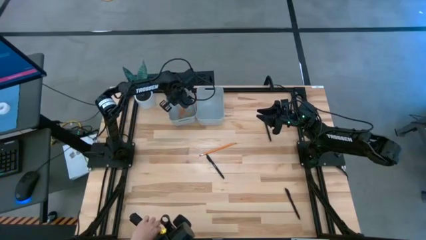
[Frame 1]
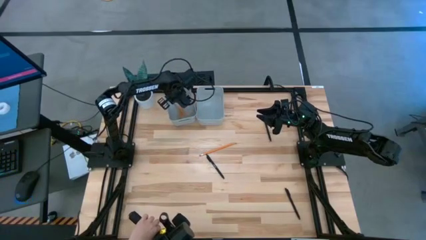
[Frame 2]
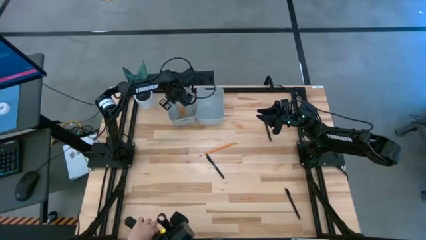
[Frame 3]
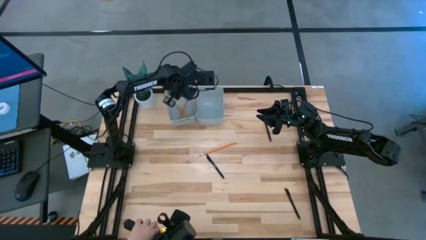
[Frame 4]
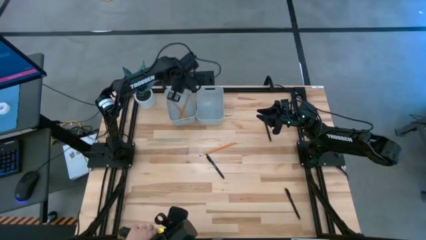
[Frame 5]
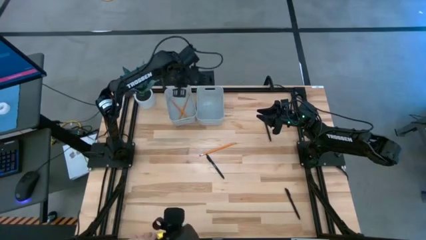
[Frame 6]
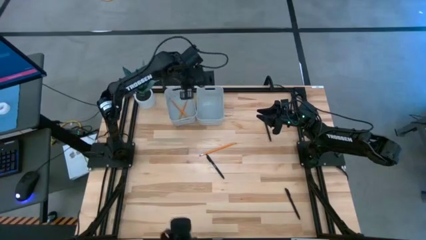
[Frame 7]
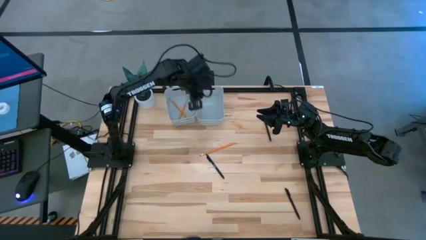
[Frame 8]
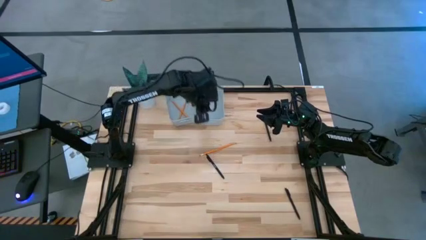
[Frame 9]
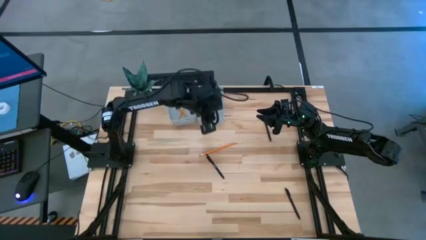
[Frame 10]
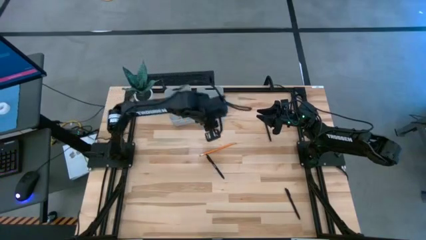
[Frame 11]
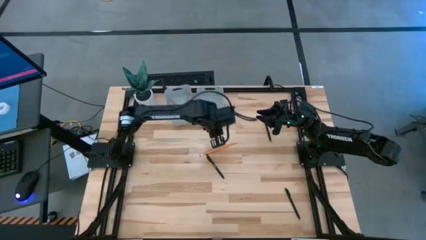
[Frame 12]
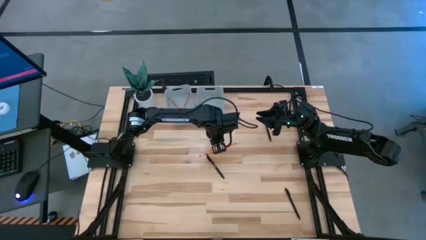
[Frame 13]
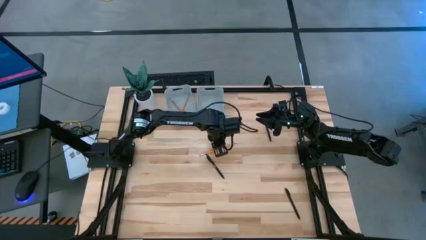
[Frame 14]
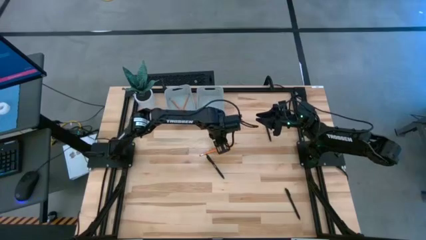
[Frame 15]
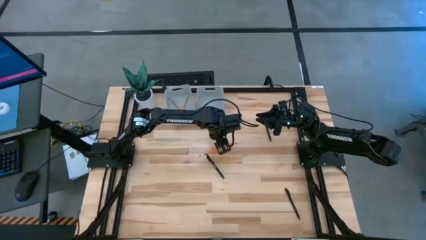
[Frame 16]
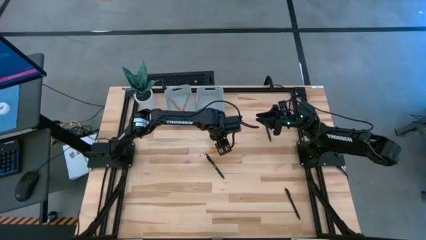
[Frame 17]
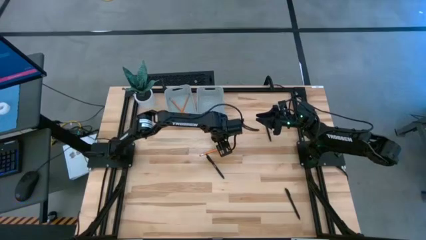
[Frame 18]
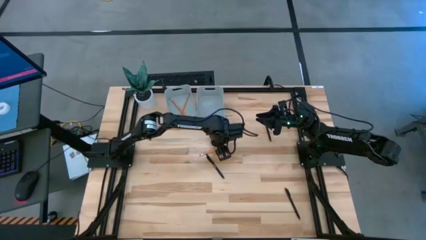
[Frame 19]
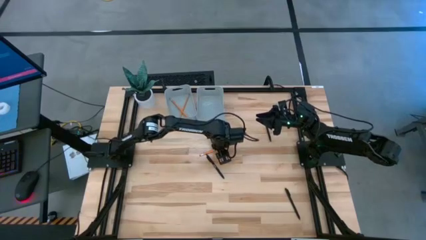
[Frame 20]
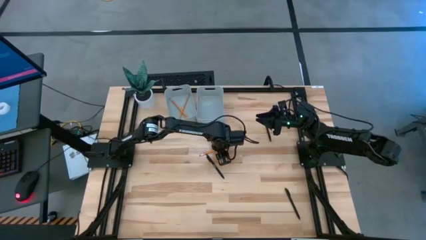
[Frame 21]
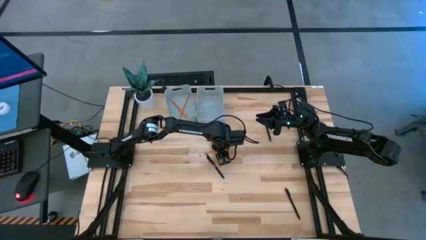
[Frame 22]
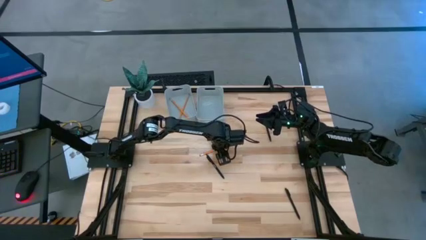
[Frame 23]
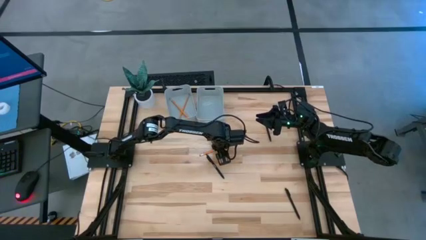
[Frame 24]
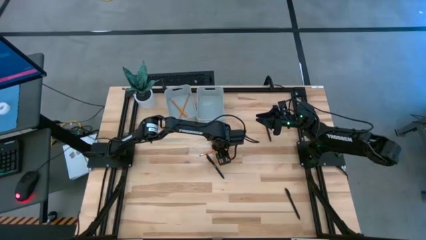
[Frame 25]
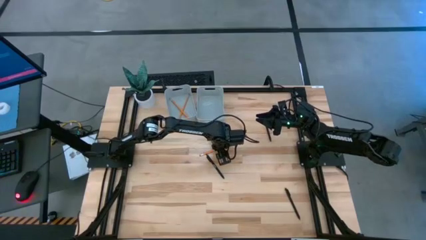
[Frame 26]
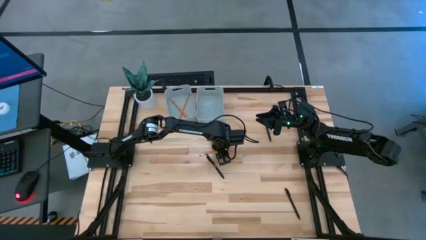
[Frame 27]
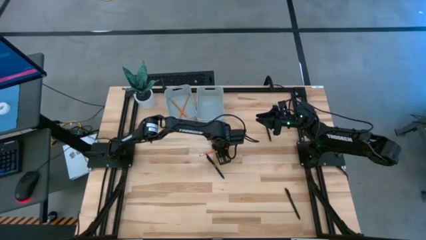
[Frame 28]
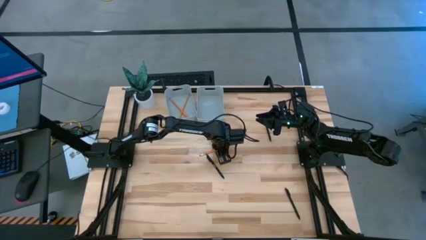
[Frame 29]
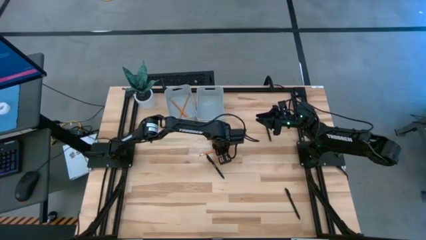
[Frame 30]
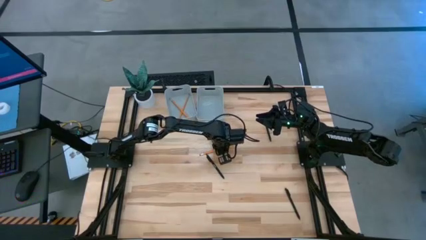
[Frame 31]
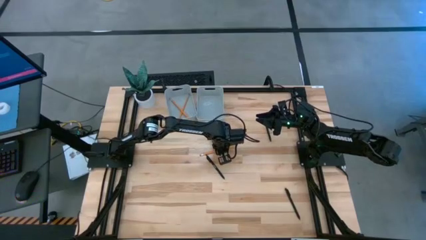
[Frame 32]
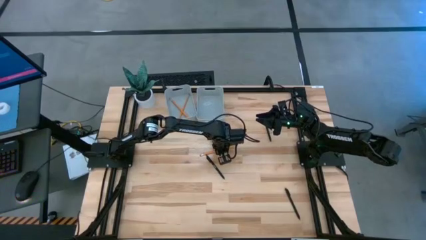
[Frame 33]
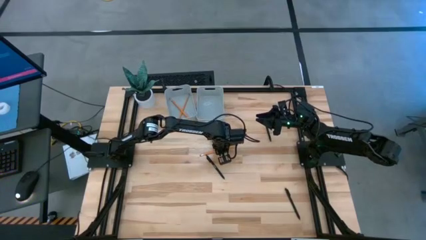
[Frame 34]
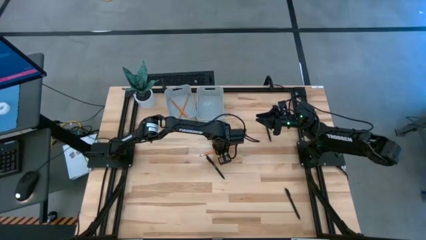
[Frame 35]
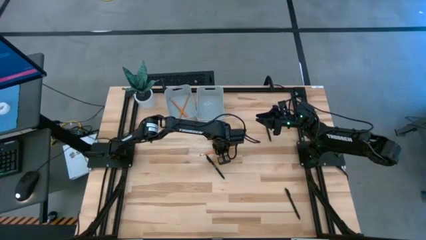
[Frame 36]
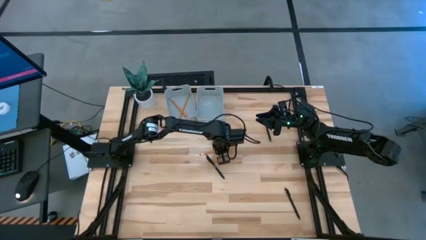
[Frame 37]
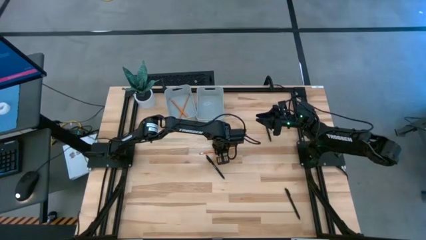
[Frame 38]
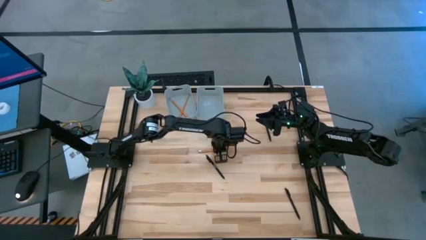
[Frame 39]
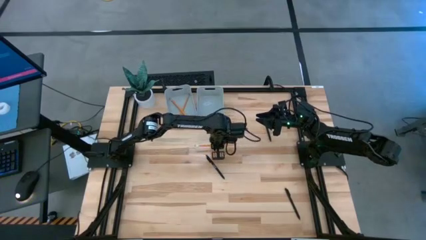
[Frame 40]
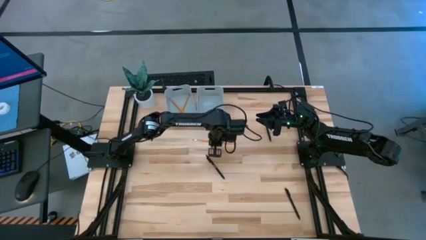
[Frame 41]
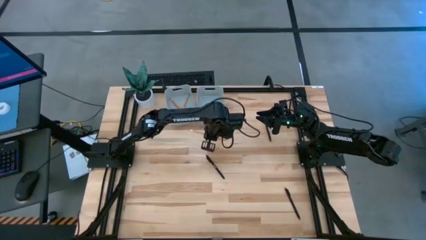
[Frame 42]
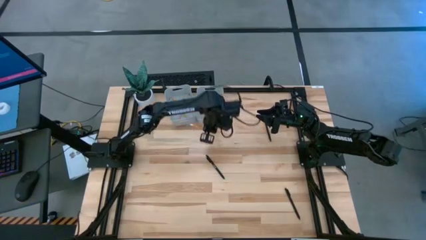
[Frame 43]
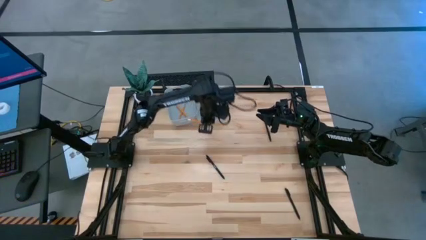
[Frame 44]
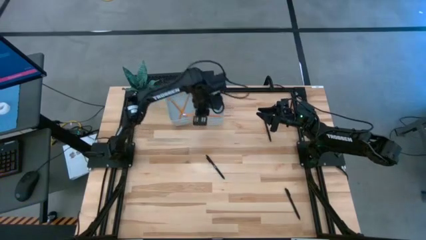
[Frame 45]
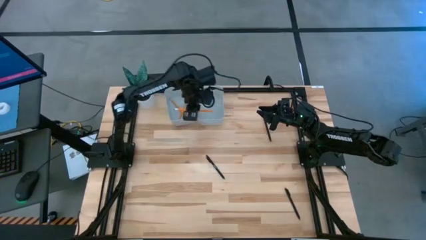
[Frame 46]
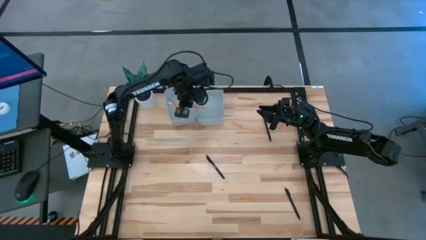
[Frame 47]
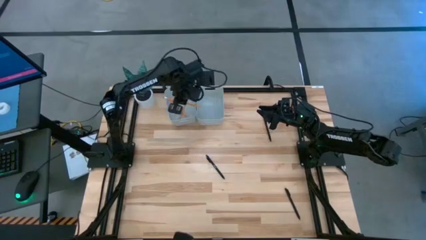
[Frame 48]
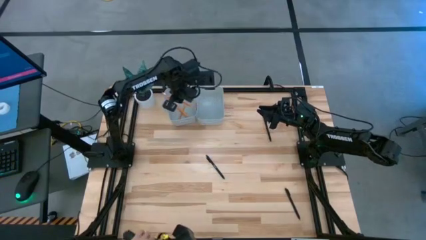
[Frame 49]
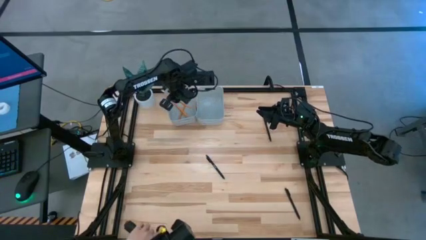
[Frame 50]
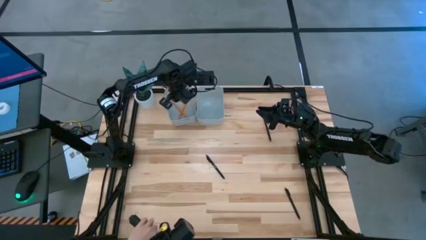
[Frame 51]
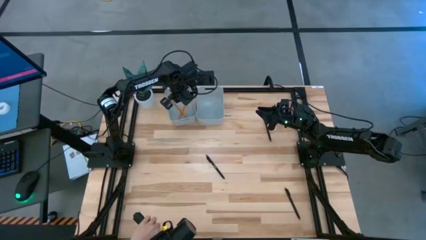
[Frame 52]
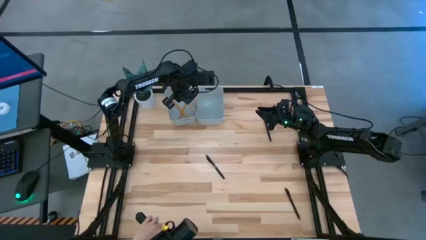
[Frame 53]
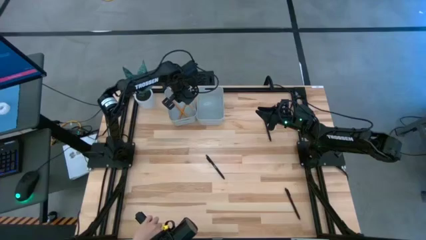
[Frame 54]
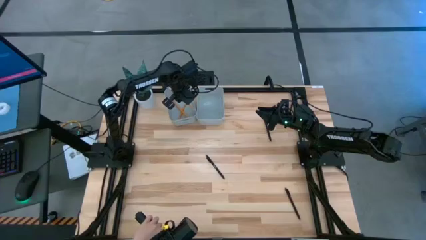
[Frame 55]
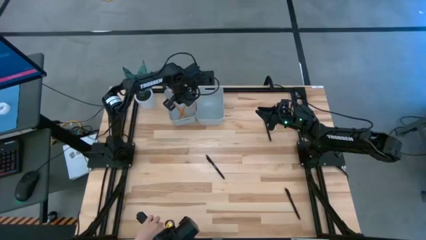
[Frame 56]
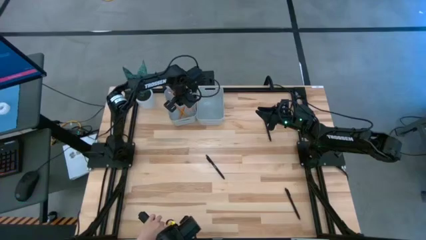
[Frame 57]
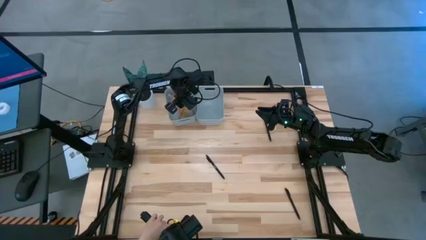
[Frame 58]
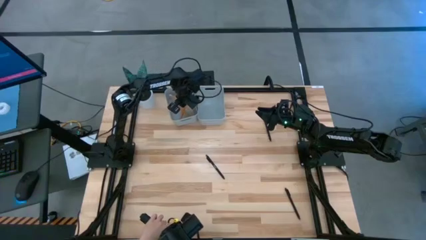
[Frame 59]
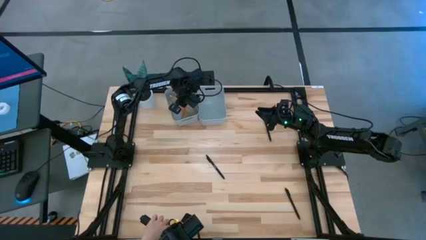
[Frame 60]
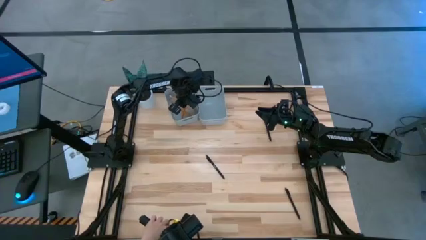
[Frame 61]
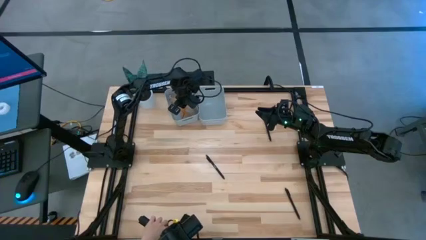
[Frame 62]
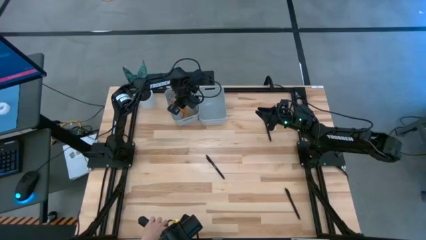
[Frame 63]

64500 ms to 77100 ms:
Task: Sort pens & pencils
Put the pencil into the left bin
